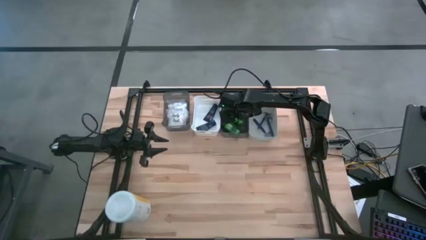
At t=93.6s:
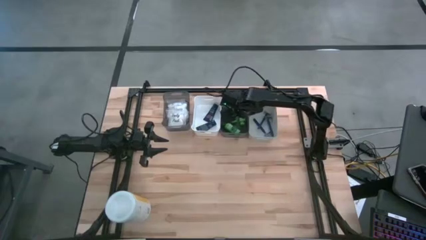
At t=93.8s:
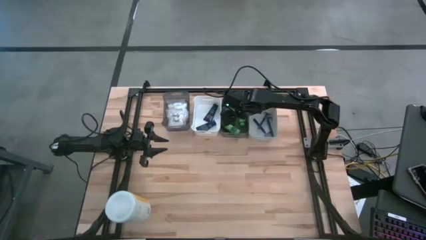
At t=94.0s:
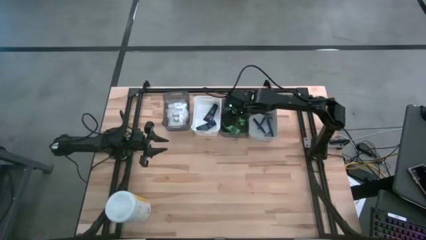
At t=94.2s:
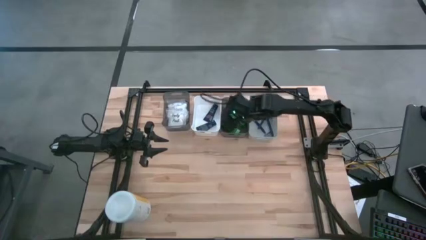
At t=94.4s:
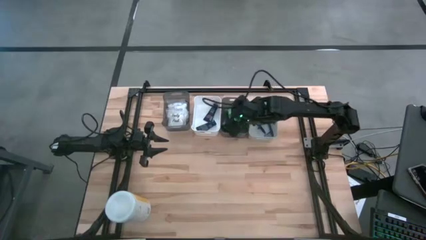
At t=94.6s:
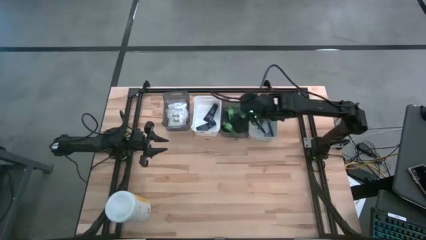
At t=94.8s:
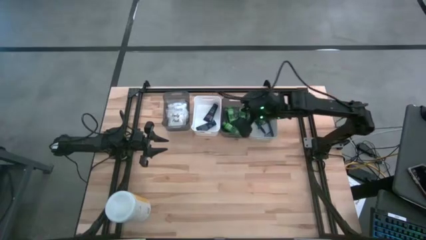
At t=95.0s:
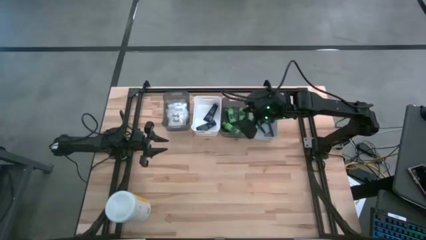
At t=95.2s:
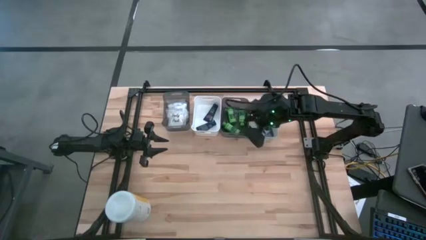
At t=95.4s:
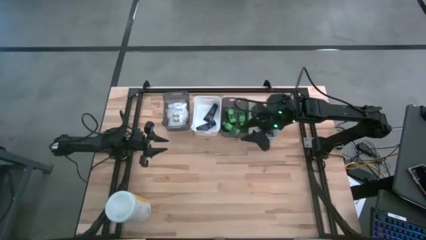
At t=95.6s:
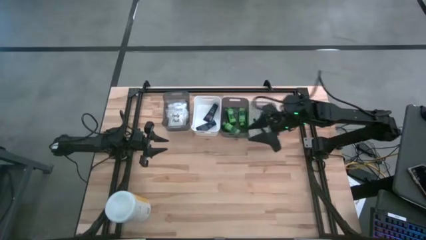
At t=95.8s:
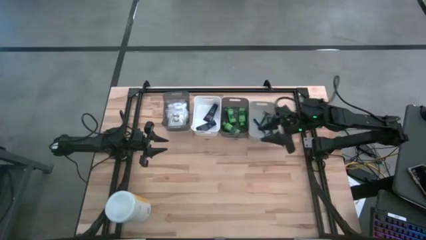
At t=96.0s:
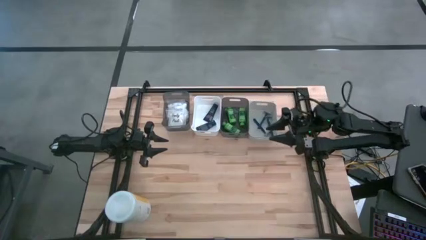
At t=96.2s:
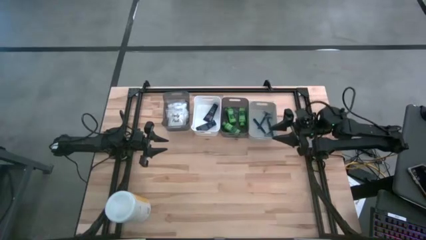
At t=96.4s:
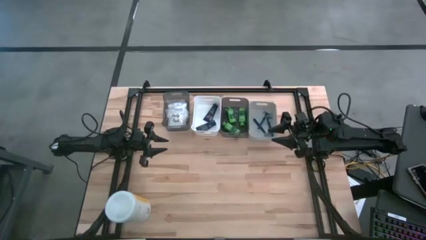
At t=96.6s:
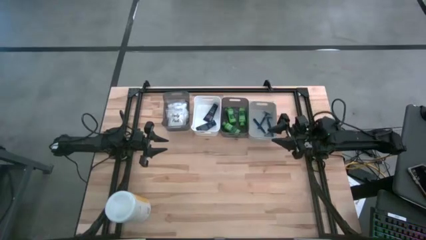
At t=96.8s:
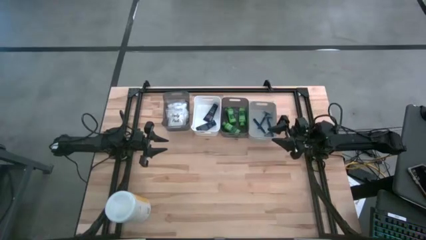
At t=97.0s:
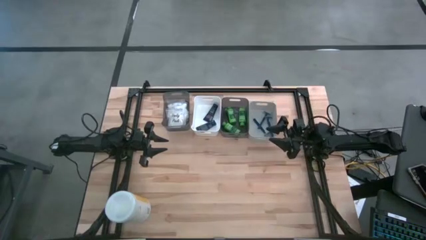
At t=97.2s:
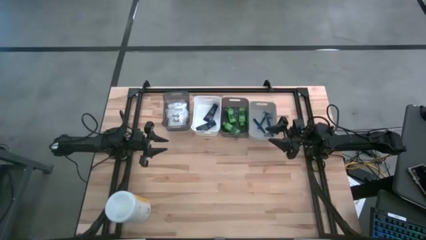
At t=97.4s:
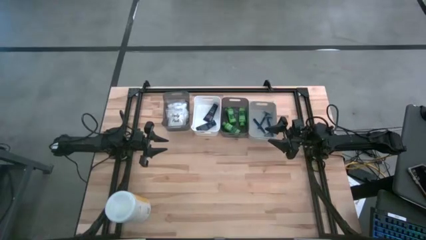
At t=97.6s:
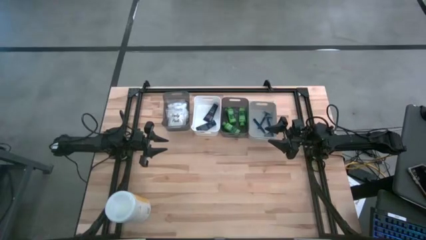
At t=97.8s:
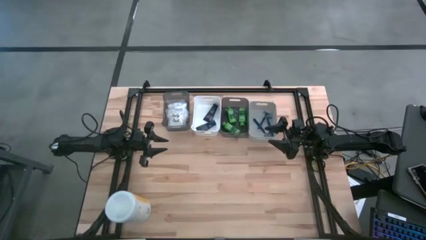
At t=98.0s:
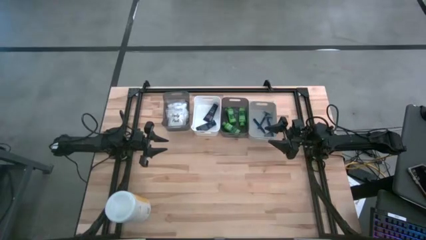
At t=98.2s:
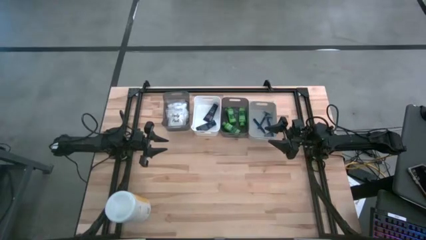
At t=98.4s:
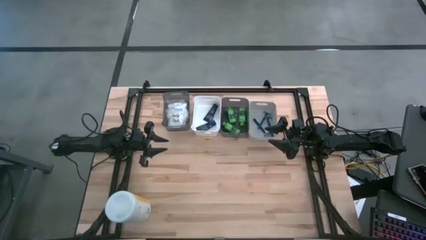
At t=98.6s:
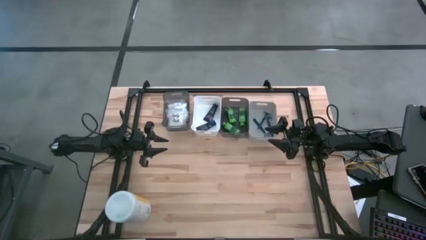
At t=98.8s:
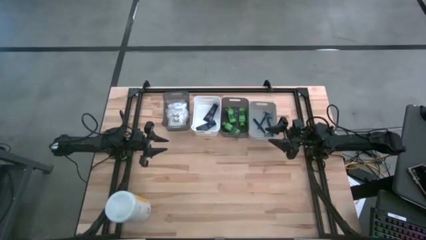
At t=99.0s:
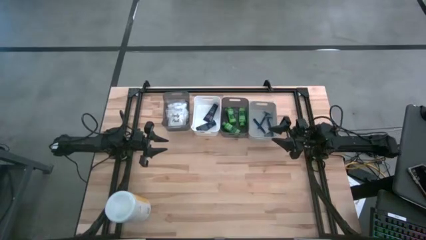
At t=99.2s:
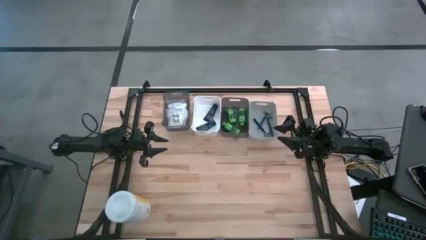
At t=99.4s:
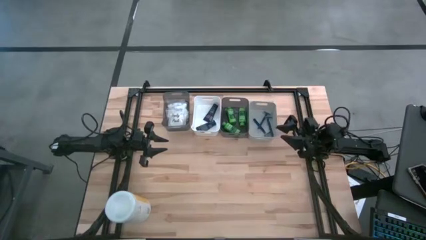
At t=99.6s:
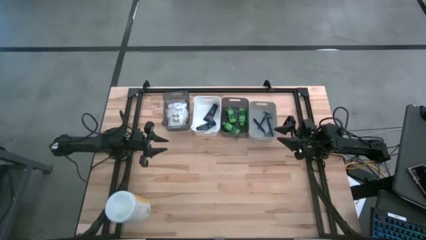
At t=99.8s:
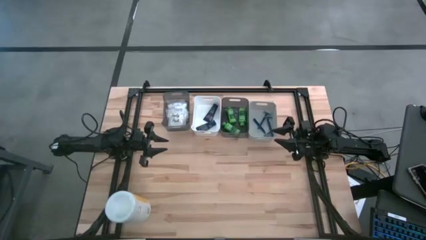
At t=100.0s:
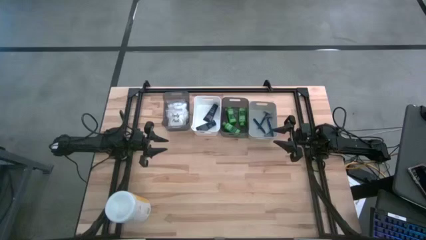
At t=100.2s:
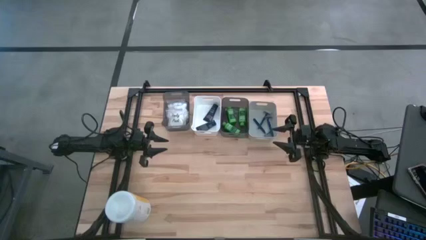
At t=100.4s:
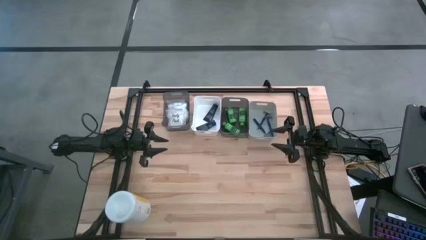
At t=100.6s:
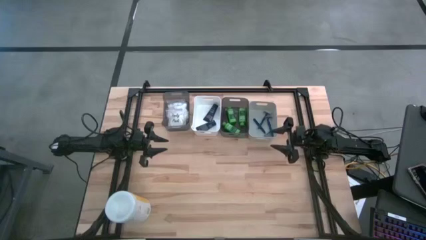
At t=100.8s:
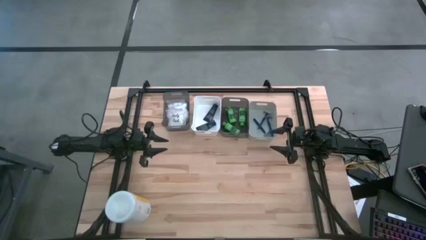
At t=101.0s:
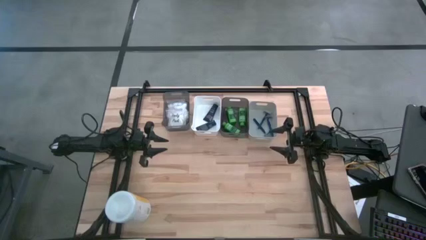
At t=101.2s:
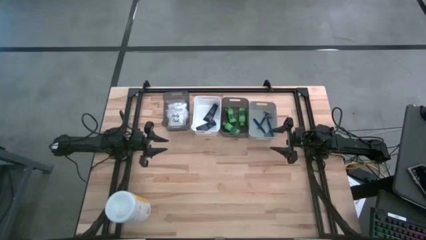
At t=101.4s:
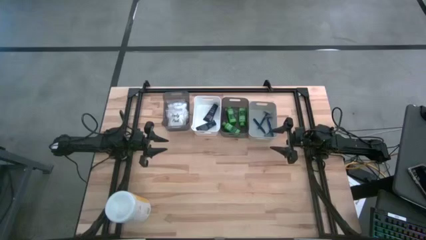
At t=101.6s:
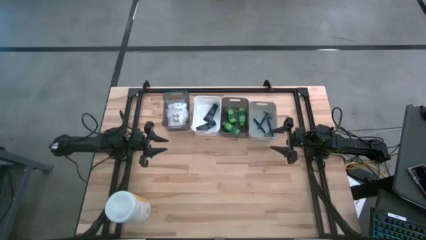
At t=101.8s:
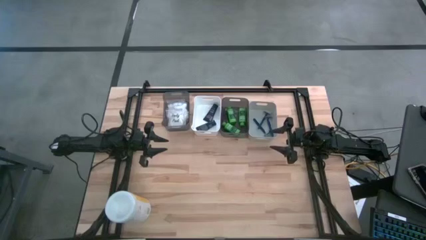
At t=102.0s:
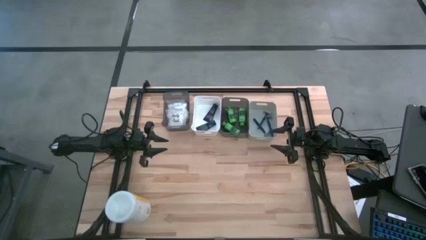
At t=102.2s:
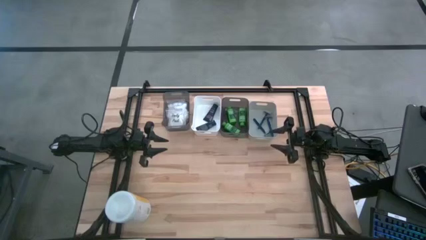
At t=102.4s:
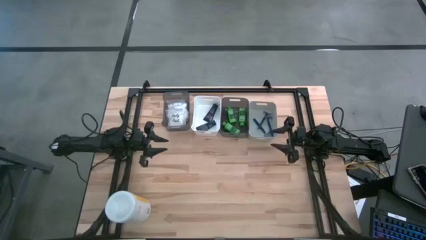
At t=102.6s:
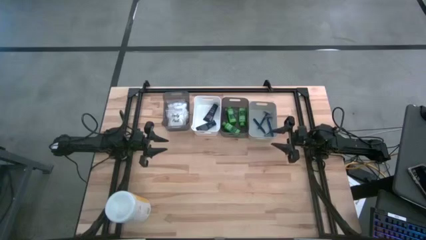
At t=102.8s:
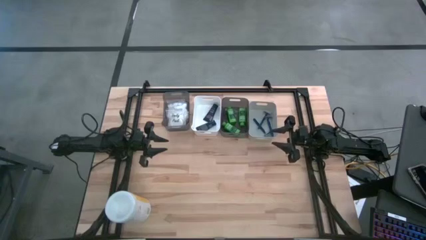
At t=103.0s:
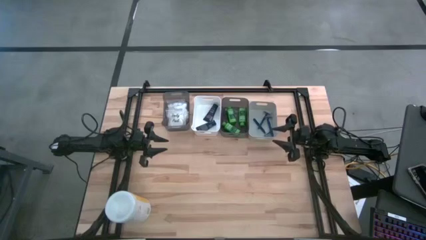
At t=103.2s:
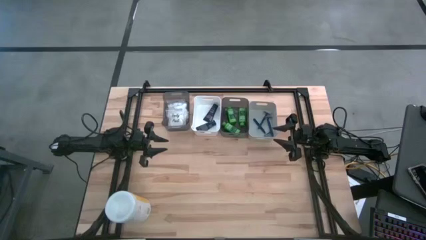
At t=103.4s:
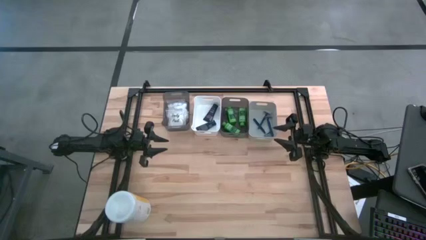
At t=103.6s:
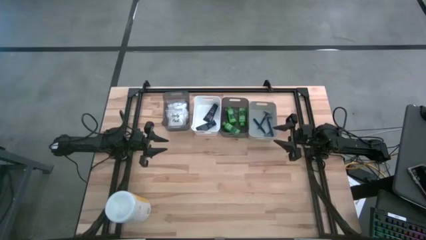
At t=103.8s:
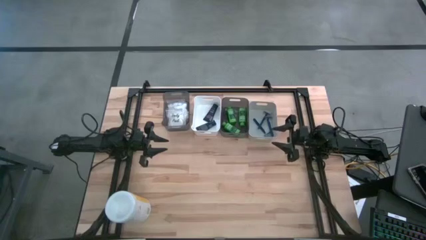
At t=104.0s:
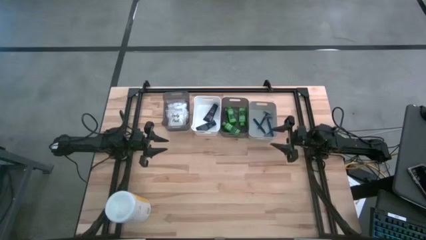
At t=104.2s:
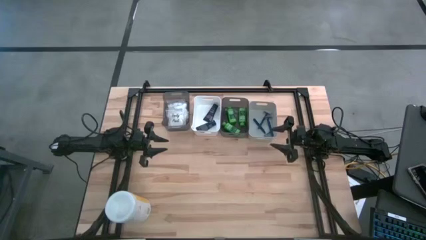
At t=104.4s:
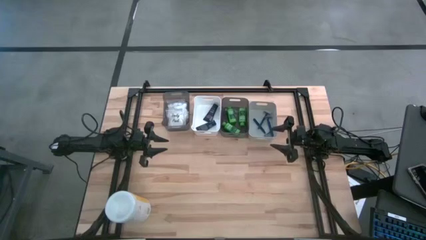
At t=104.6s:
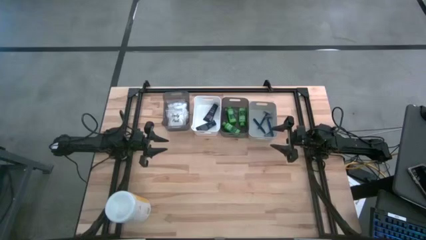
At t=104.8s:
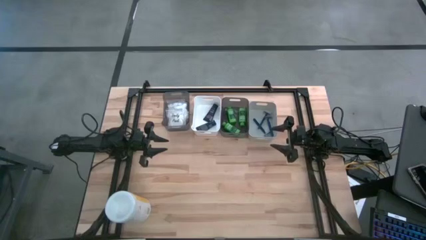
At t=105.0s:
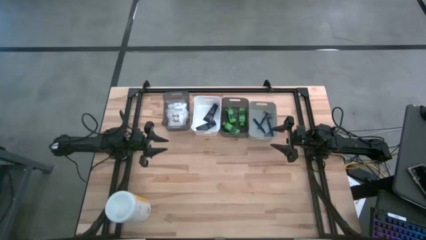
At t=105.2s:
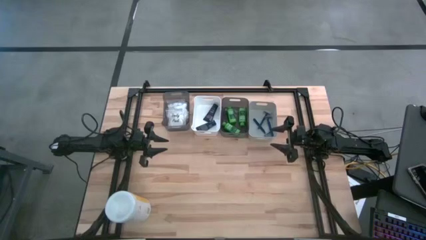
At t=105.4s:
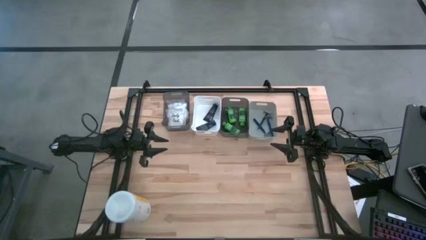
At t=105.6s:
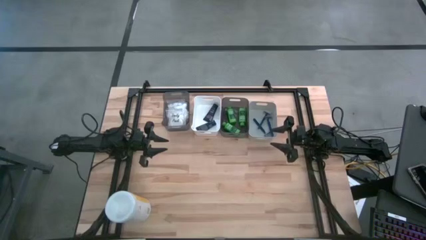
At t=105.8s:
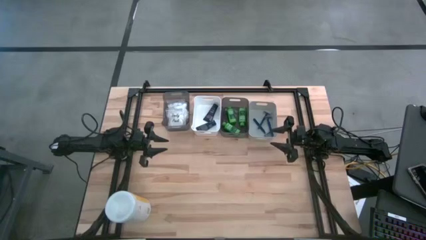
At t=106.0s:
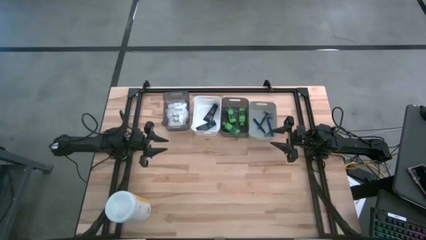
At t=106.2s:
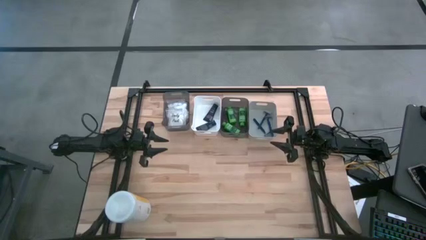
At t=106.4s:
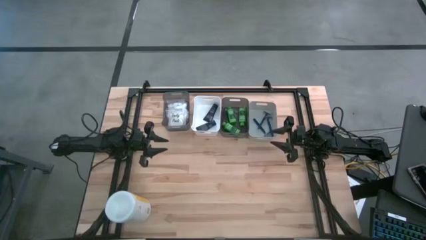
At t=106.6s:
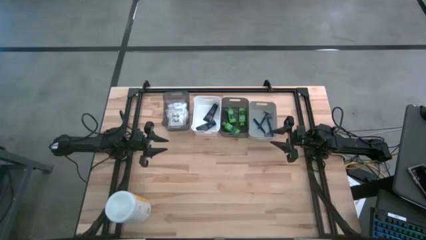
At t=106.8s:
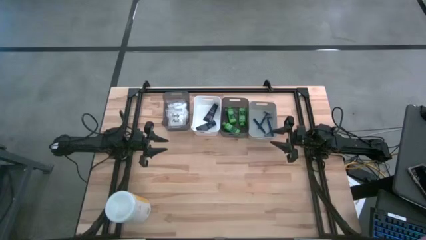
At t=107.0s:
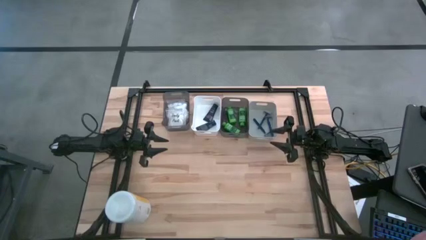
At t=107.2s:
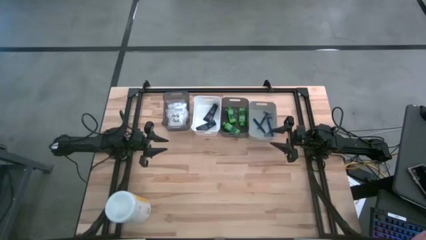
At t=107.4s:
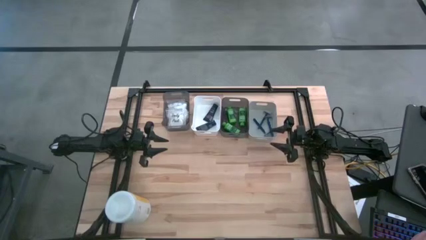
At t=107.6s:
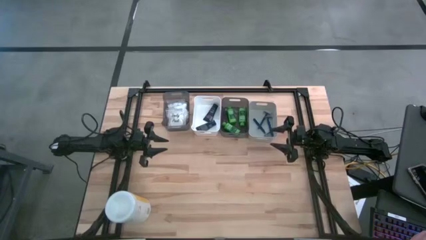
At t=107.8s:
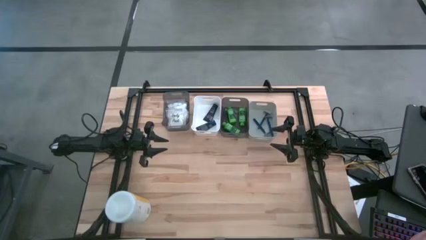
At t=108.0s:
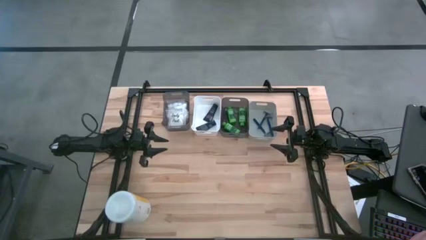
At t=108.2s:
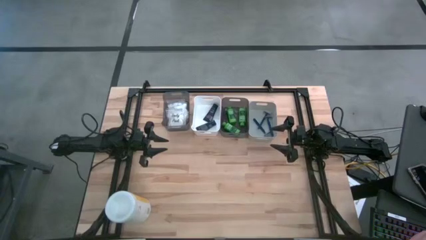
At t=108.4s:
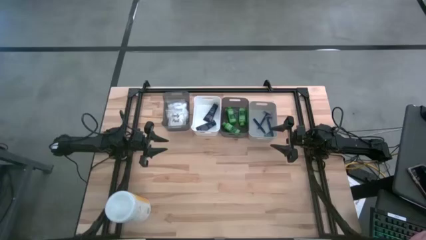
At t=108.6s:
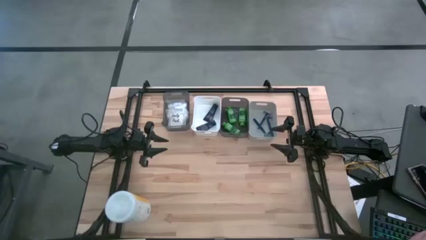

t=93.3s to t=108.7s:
Task: Pick & Place Travel size toiletries
Return to Home Position

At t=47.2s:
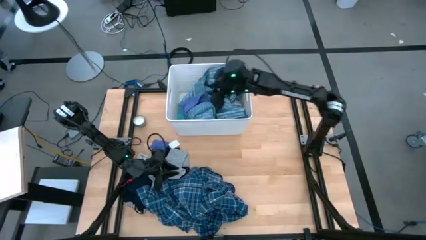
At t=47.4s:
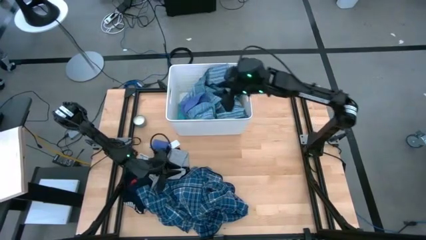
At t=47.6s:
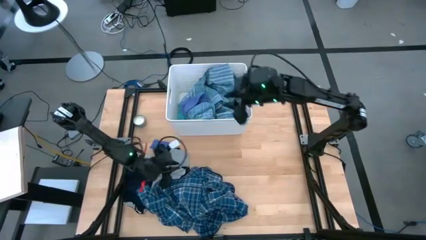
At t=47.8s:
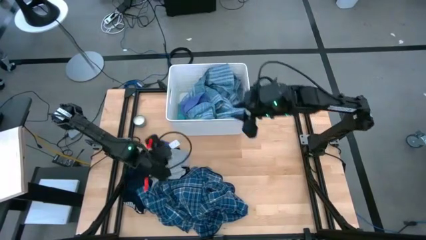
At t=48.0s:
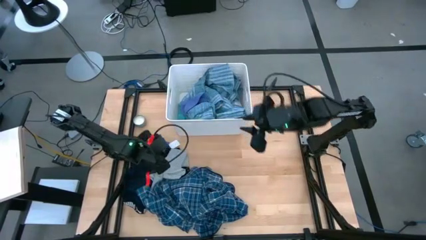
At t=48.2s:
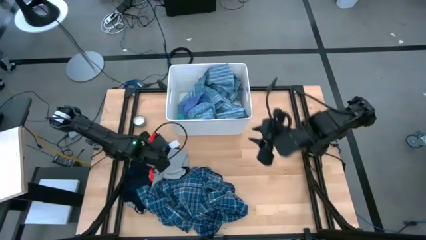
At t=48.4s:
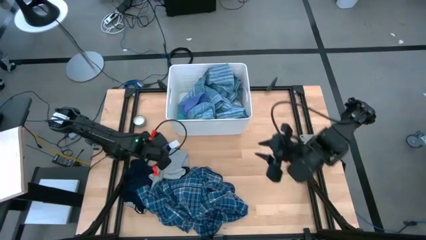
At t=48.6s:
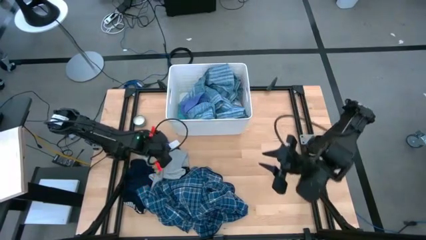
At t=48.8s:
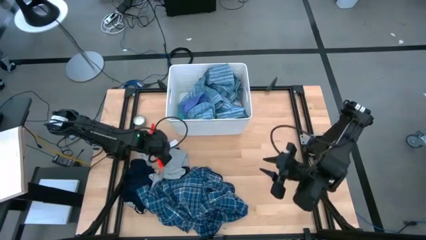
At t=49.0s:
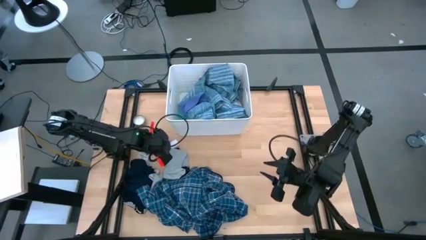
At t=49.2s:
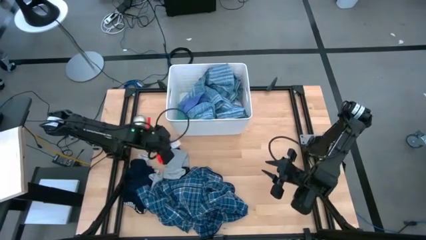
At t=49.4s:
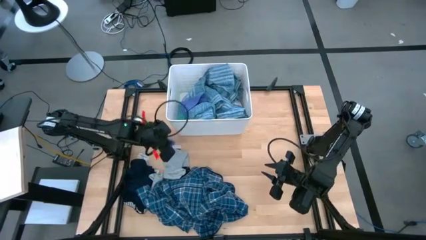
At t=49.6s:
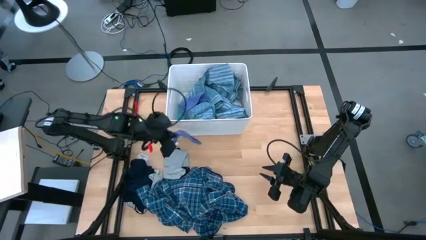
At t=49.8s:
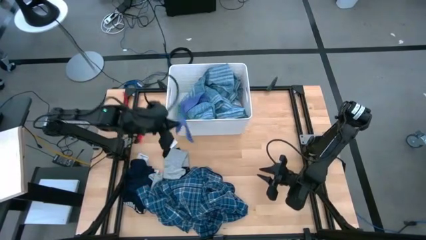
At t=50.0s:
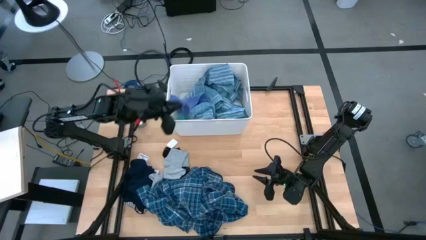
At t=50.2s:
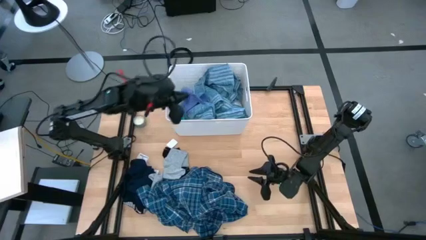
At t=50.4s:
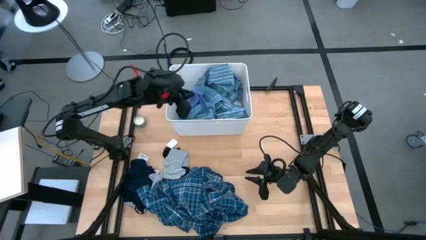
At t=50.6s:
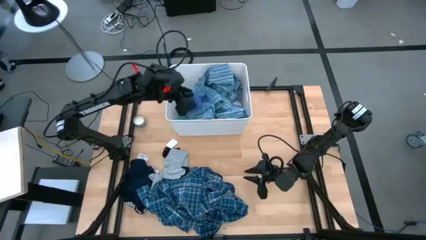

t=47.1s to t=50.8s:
Task: Sort clothes
Put the purple sock into the white laundry bin
